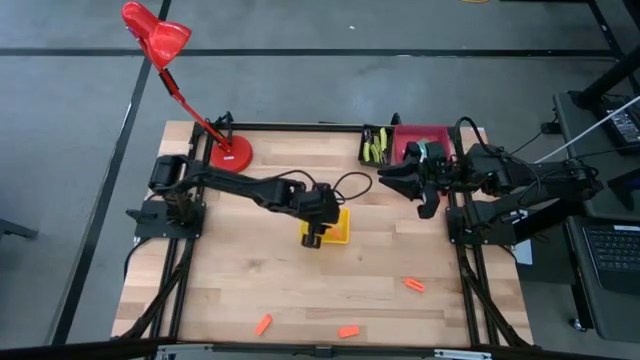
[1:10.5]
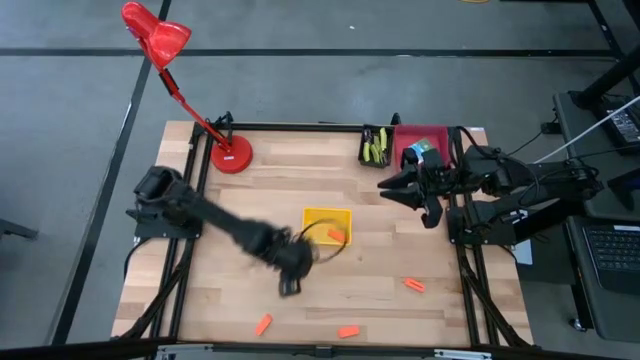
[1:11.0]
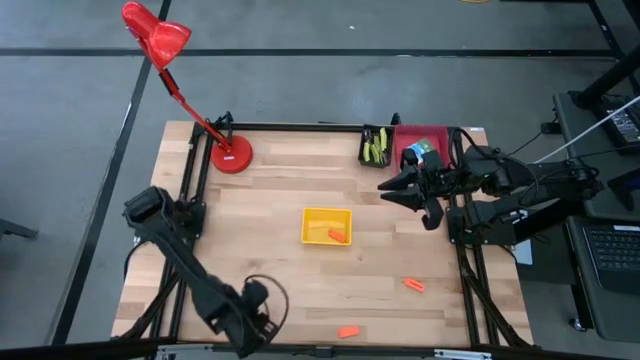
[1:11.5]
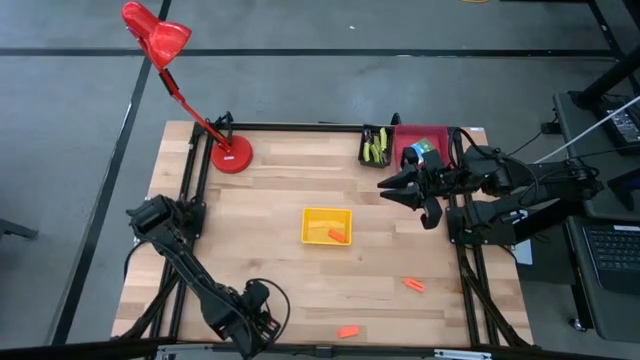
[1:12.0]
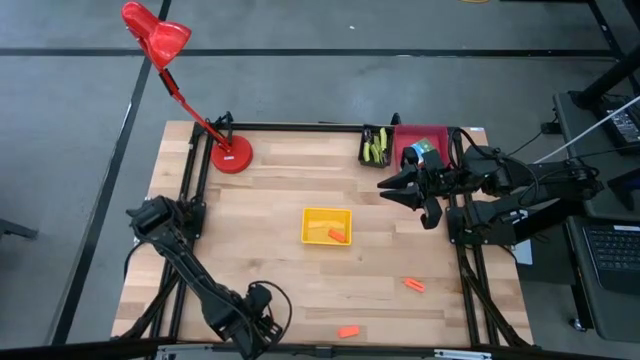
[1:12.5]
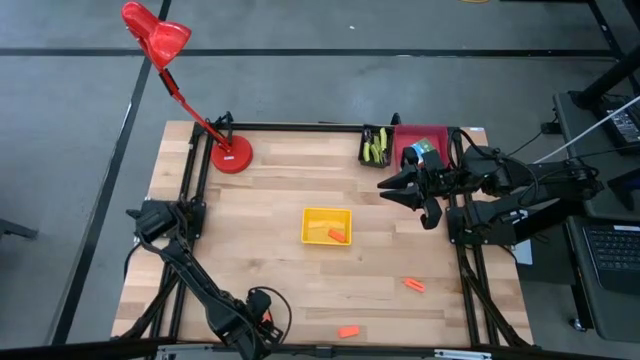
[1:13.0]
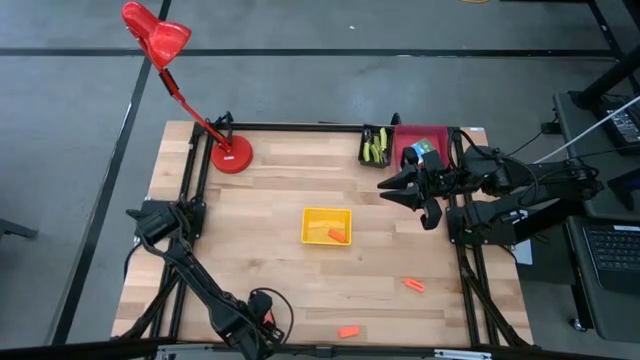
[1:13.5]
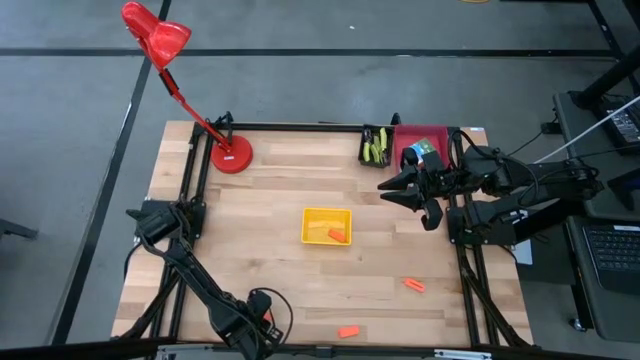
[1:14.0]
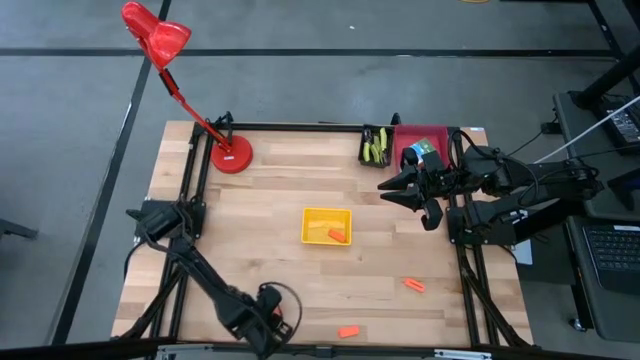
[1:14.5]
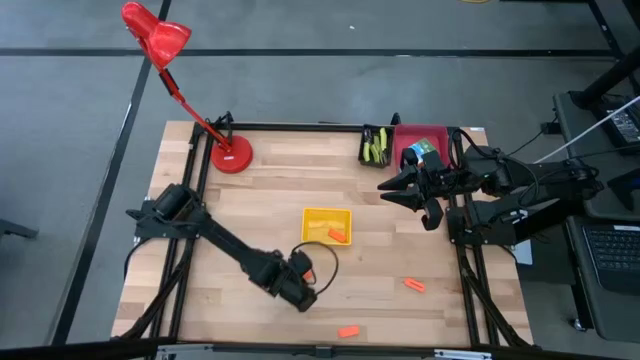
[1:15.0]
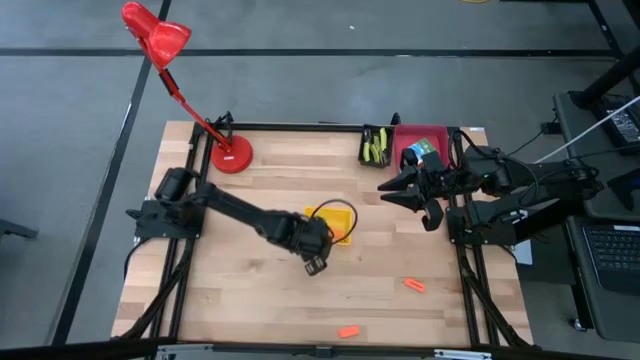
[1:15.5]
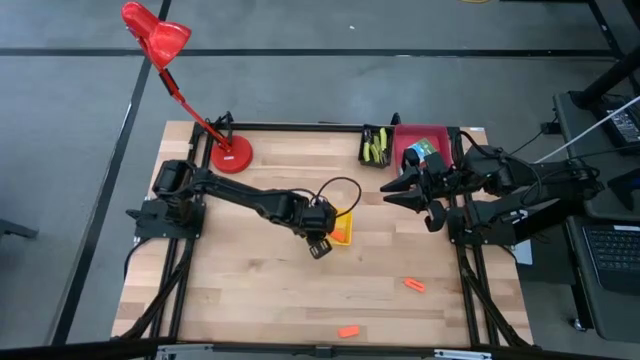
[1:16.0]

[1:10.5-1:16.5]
Task: Pick & Place School Supplies
Put the orange eraser into the yellow bin

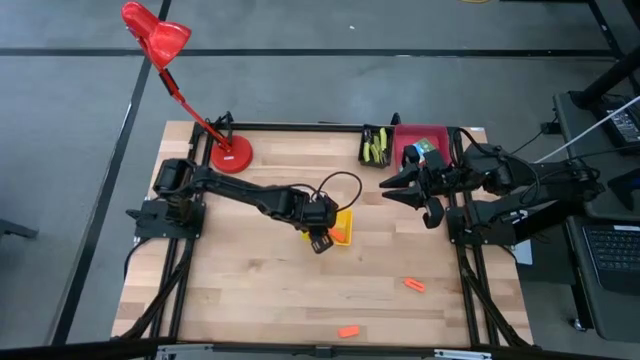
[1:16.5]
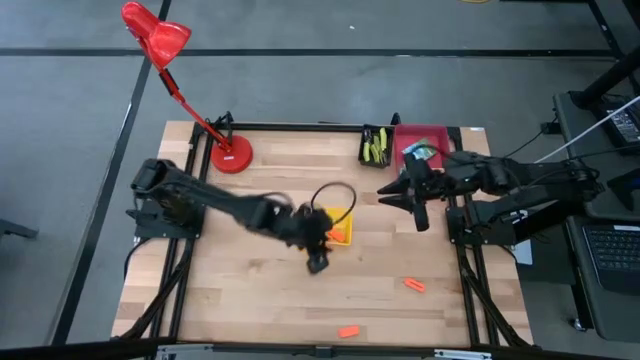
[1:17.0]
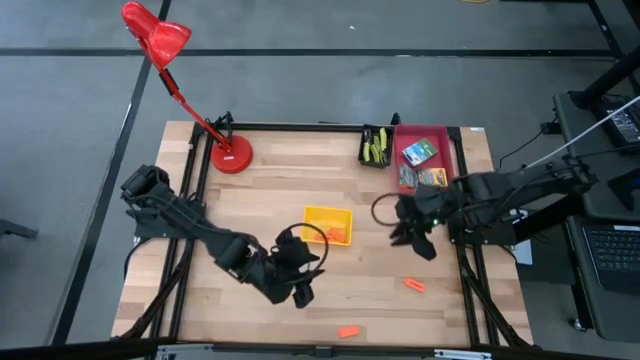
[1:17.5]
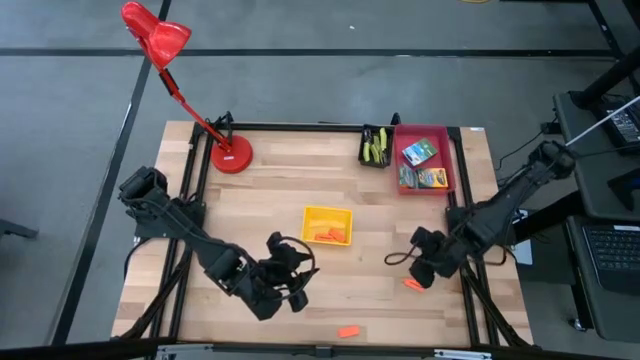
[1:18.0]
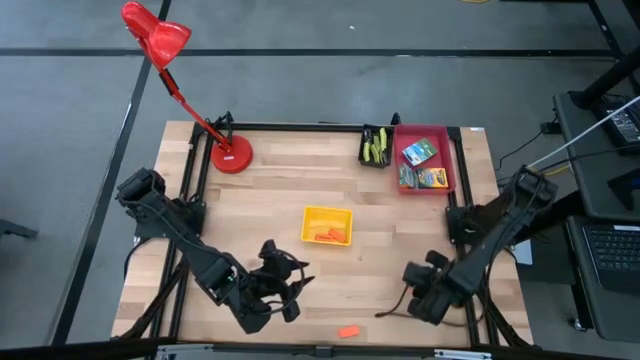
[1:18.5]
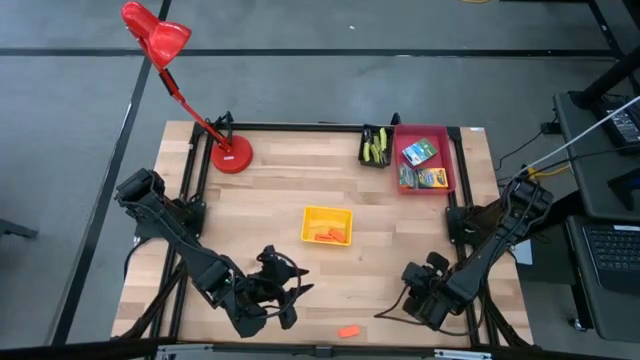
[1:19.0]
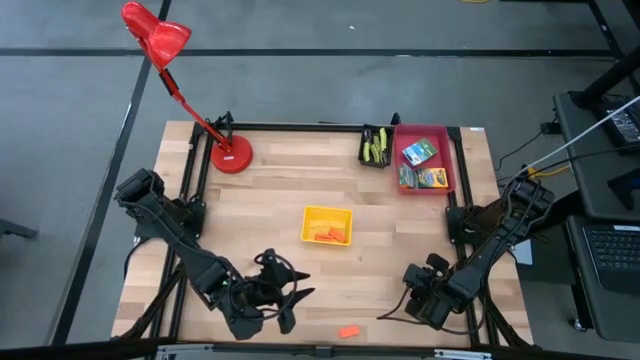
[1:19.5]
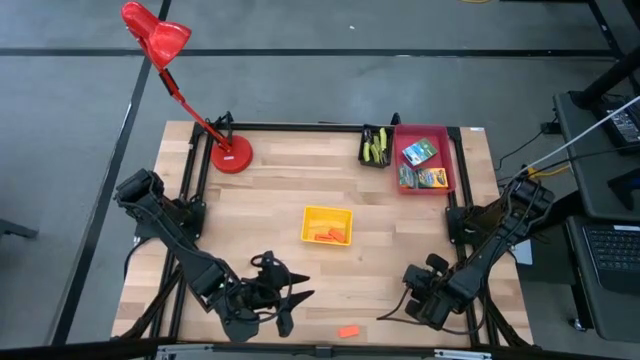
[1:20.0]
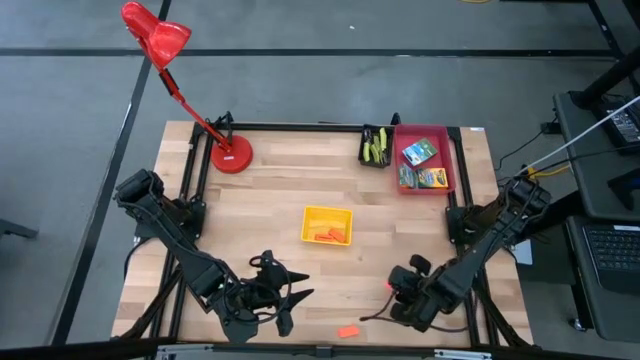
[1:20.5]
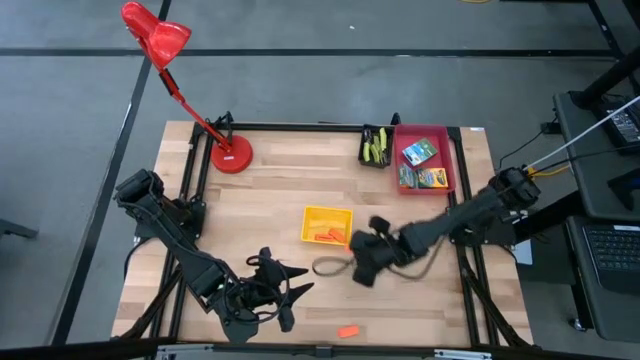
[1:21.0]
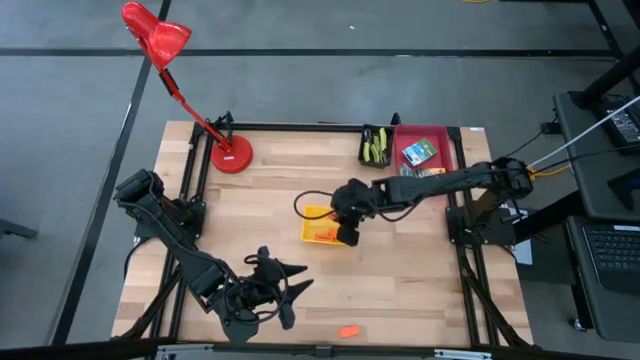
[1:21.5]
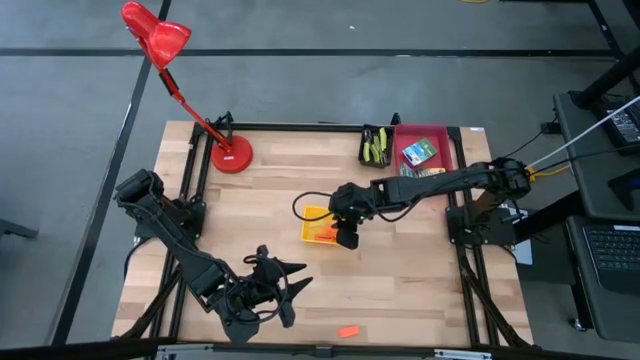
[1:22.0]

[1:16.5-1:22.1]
Put the orange eraser into the yellow bin

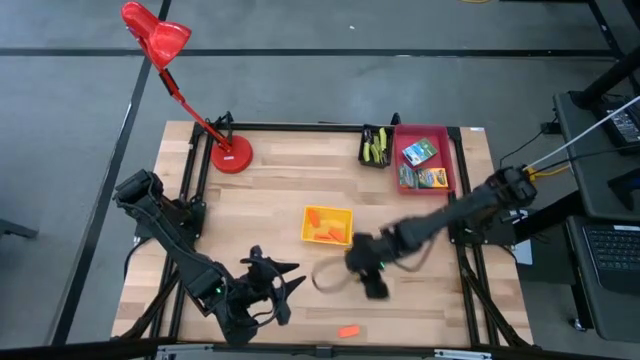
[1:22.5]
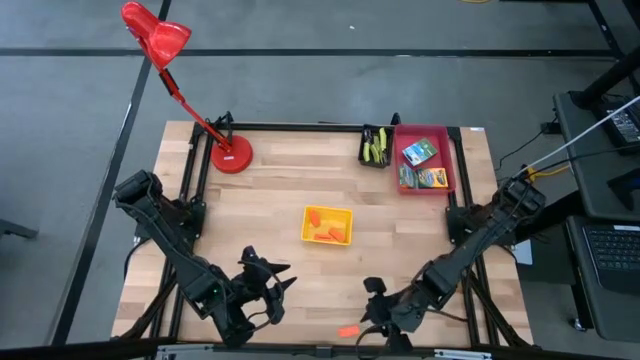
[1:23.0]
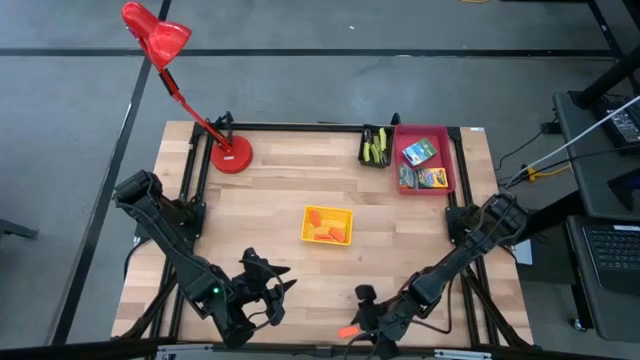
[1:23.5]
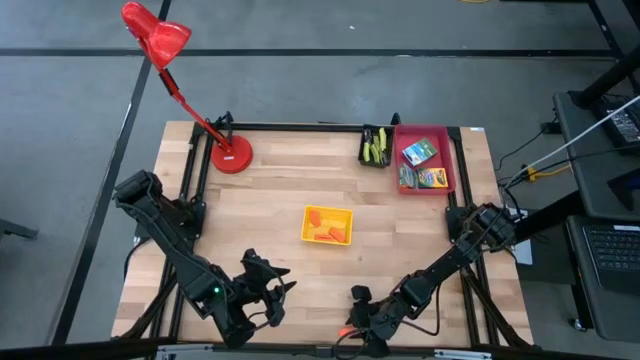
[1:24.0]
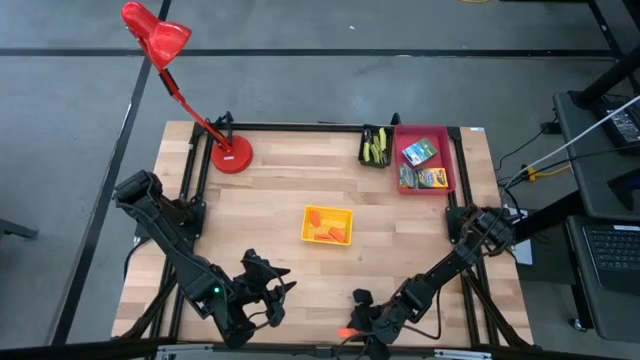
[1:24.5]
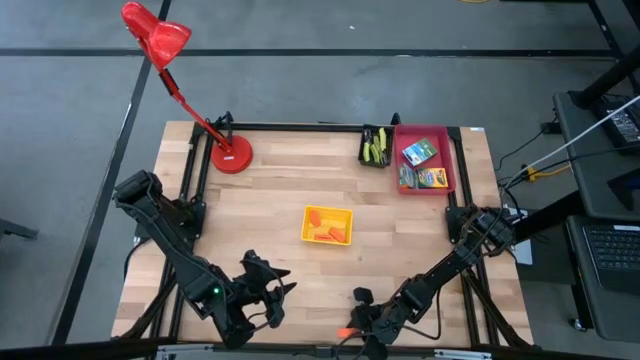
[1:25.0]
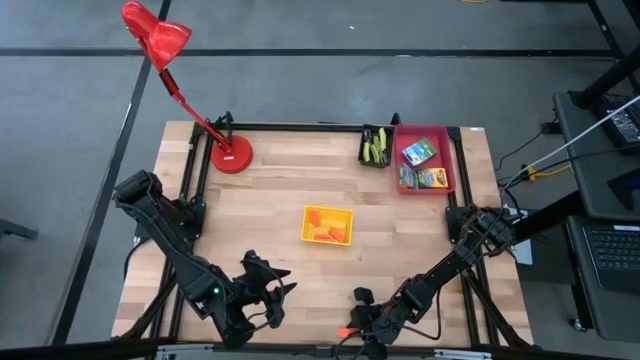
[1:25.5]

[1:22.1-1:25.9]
Put the orange eraser into the yellow bin

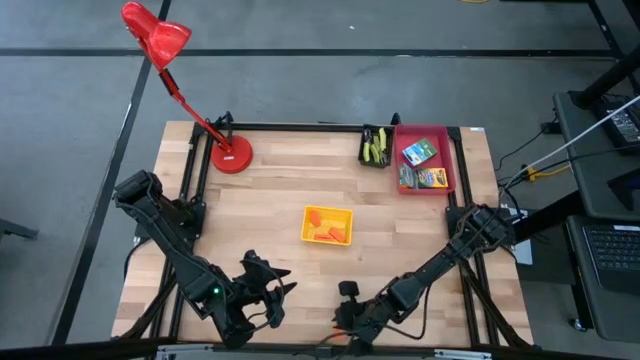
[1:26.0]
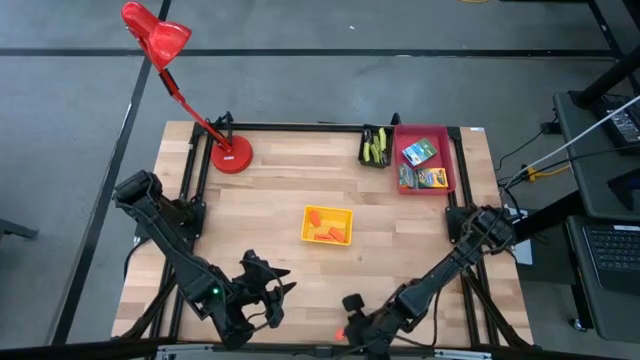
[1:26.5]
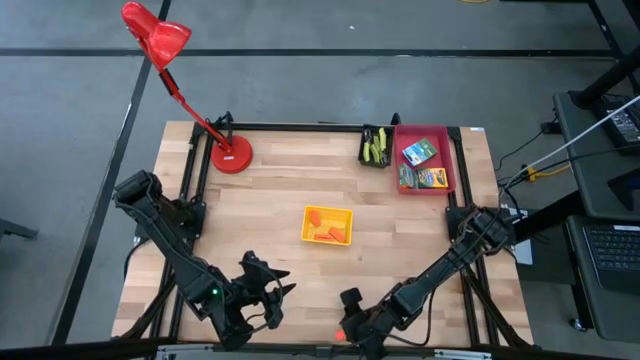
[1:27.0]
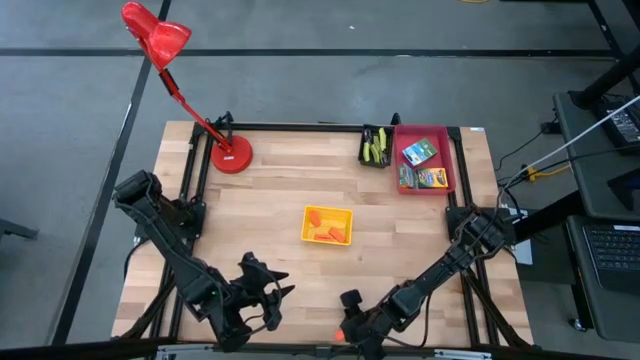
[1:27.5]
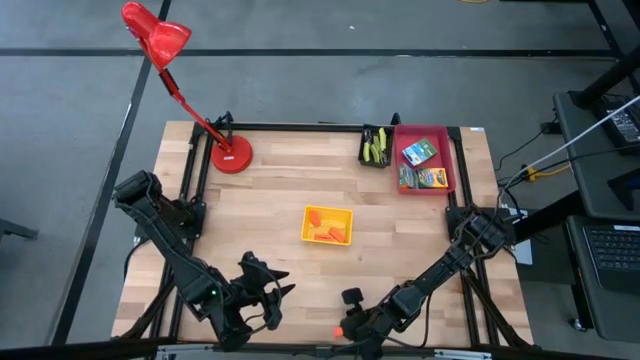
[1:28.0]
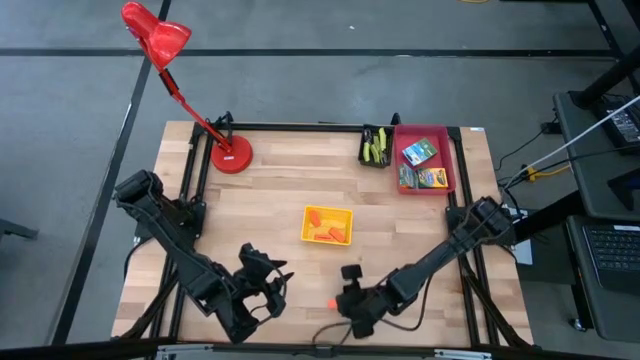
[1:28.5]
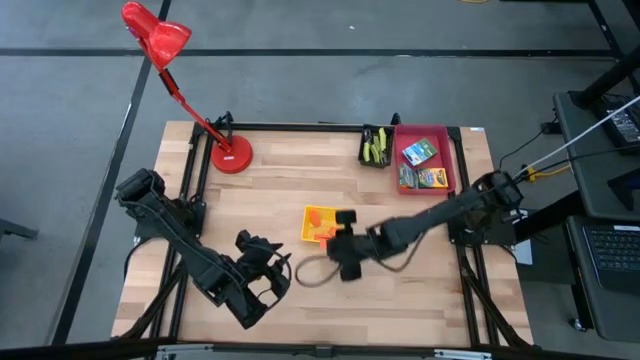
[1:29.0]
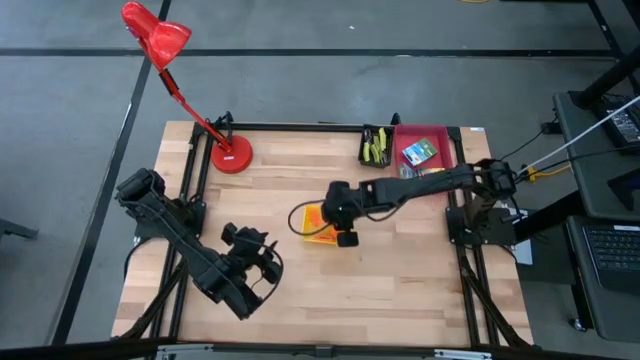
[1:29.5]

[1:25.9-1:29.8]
Put the orange eraser into the yellow bin

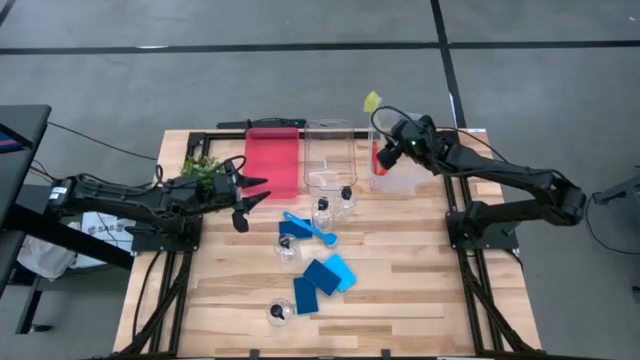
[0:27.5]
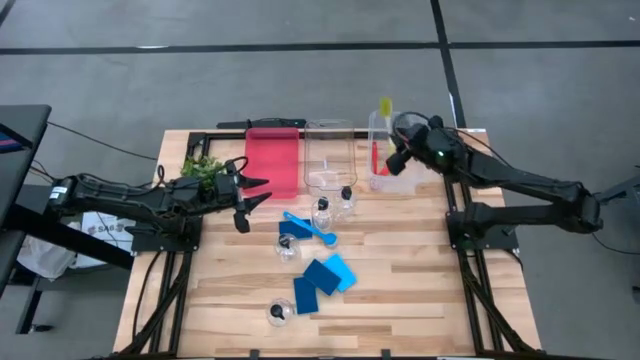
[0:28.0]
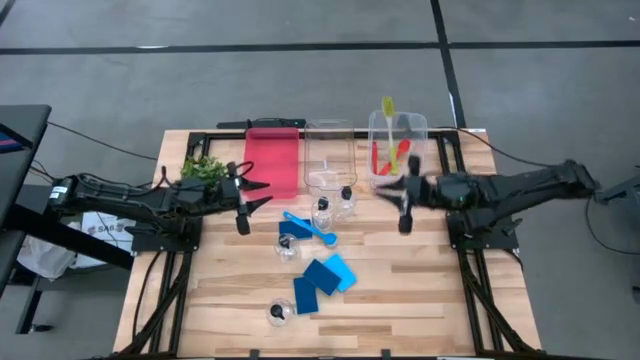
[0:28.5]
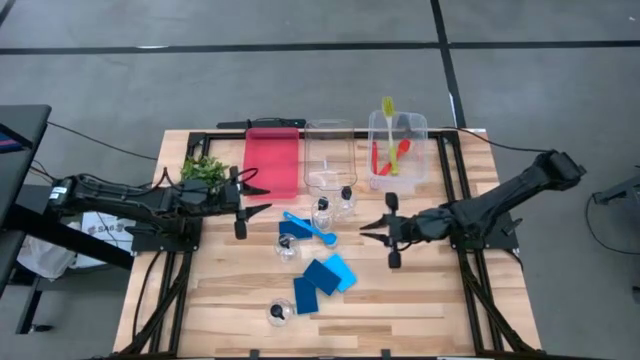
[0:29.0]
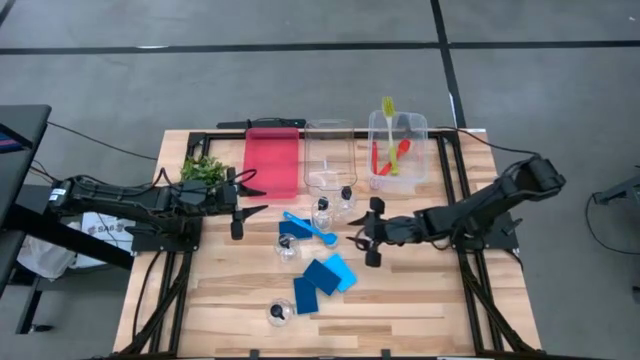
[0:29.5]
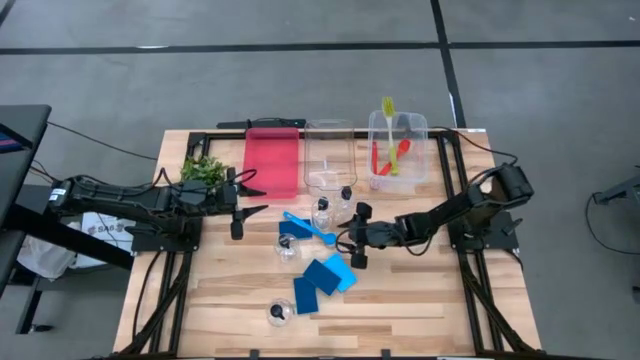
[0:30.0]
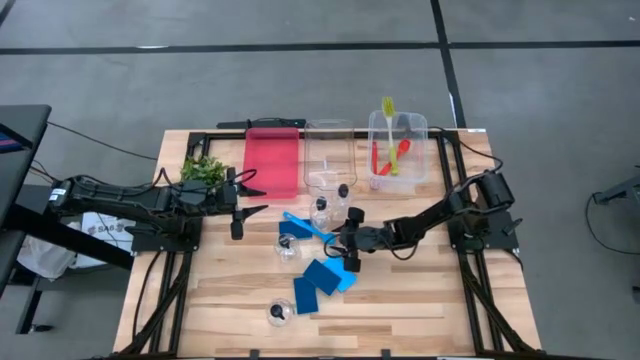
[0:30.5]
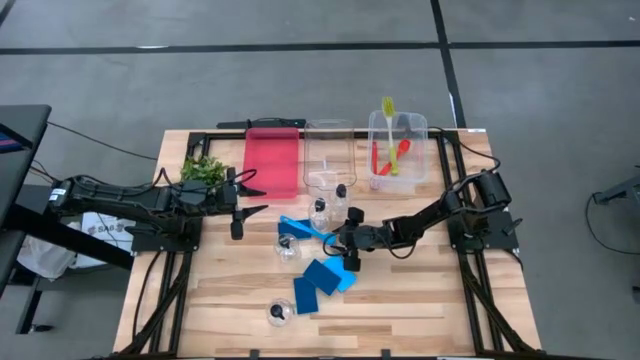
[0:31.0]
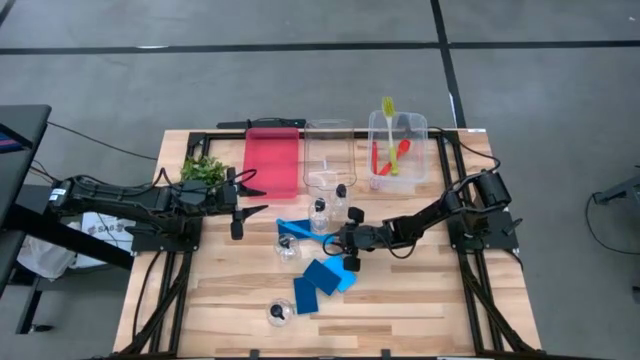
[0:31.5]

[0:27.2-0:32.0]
Task: Pick & Place Kitchen Sink Supplies
Put the blue dish brush into the right transparent bin
